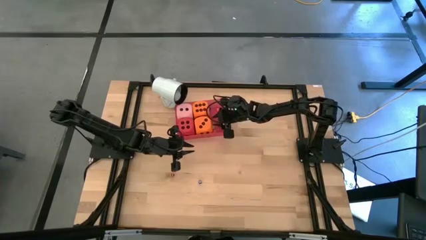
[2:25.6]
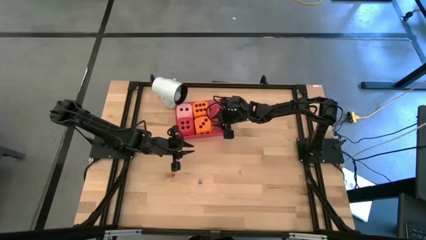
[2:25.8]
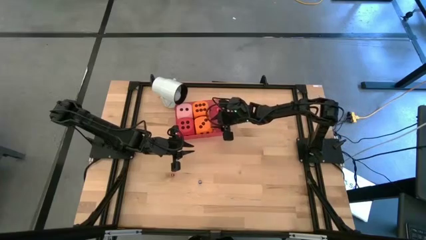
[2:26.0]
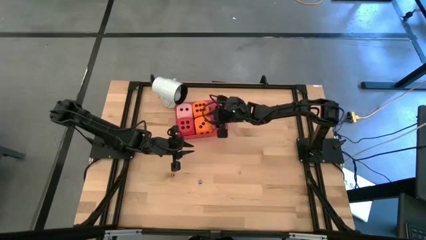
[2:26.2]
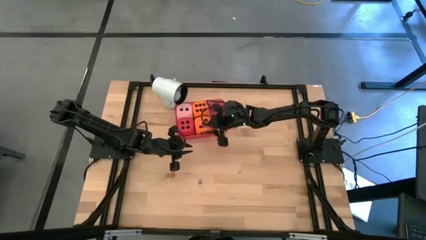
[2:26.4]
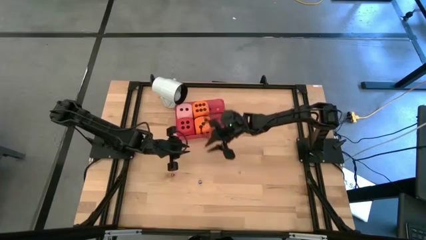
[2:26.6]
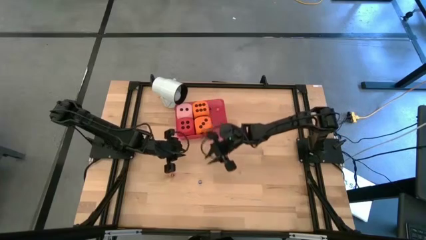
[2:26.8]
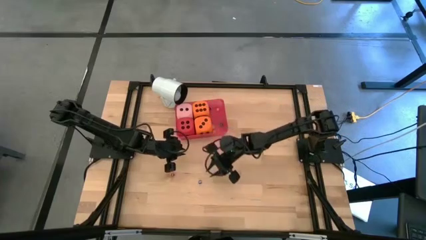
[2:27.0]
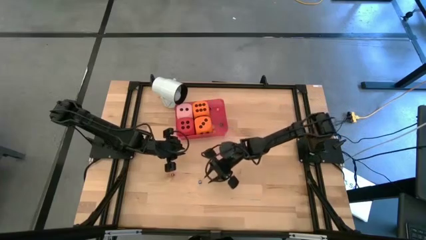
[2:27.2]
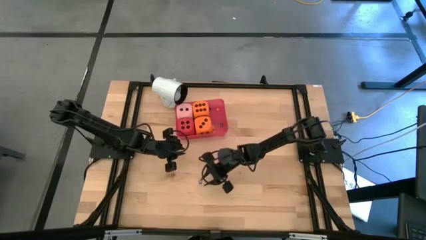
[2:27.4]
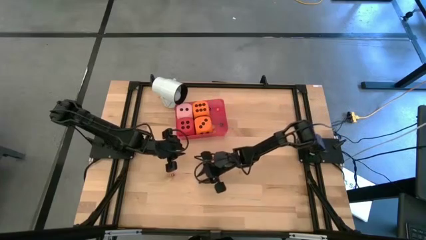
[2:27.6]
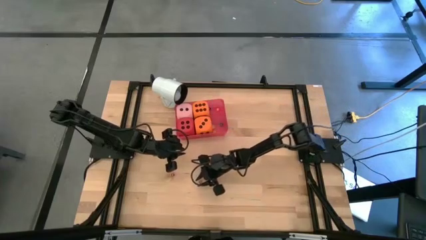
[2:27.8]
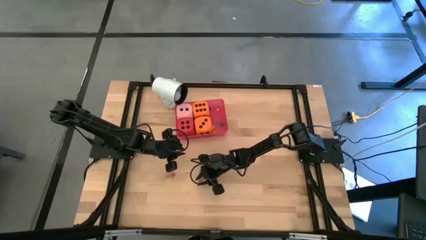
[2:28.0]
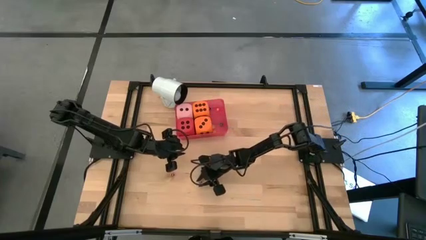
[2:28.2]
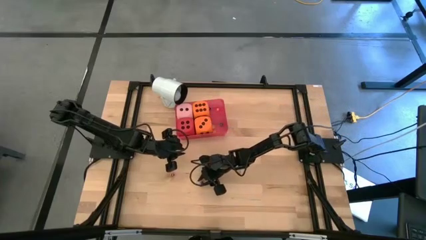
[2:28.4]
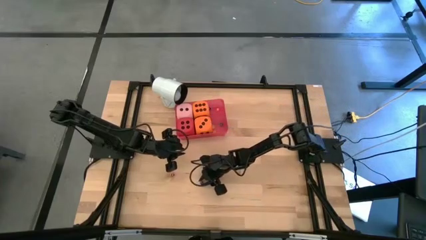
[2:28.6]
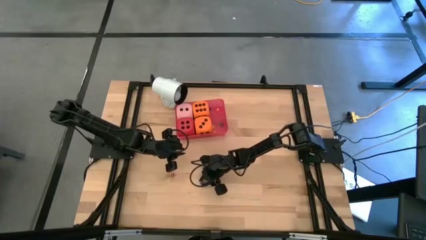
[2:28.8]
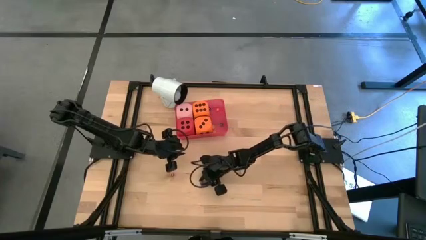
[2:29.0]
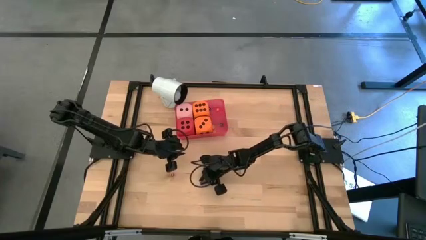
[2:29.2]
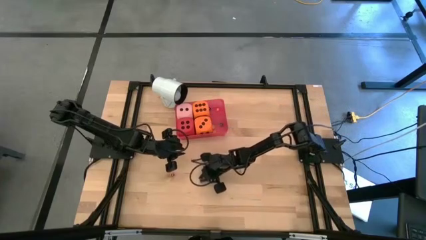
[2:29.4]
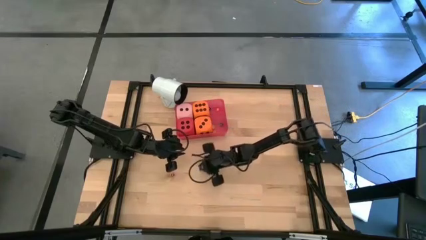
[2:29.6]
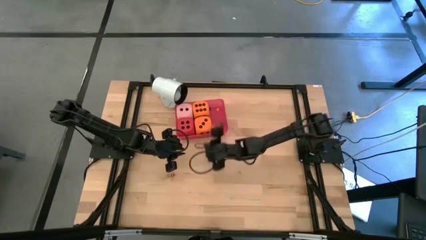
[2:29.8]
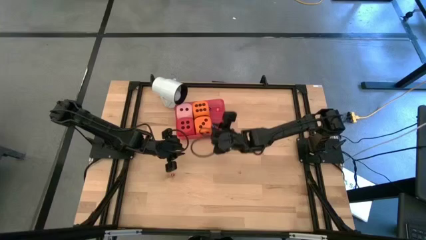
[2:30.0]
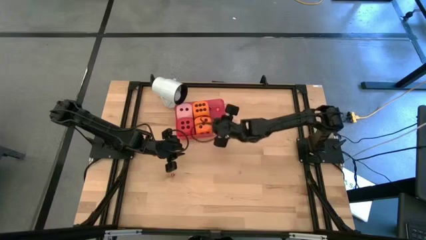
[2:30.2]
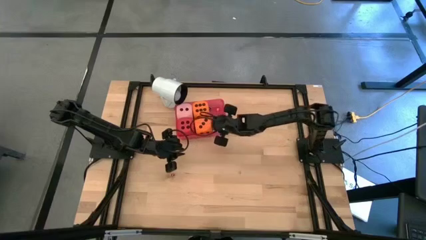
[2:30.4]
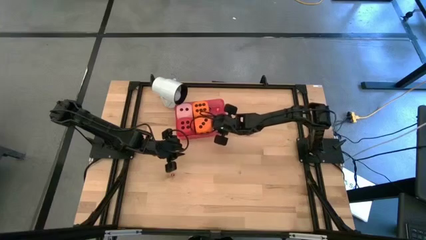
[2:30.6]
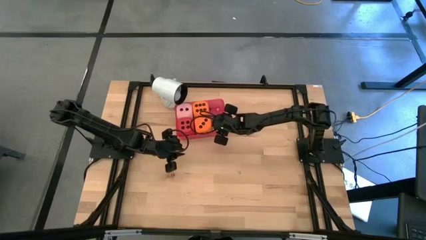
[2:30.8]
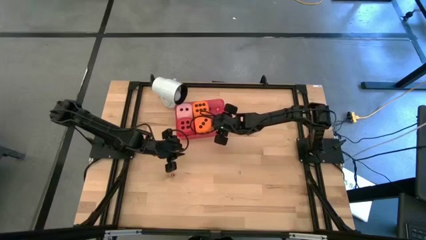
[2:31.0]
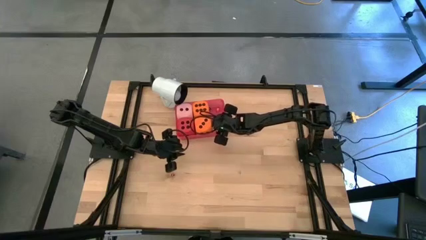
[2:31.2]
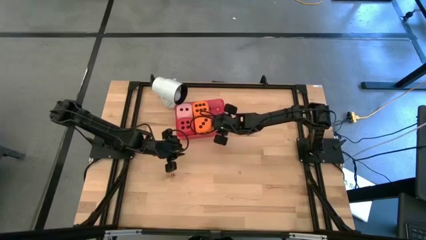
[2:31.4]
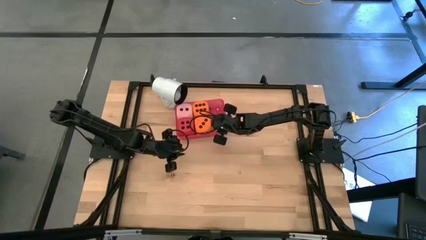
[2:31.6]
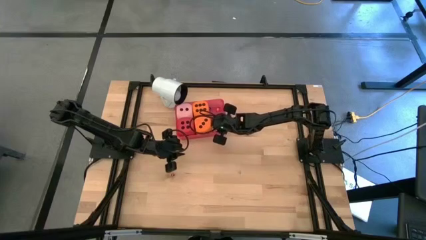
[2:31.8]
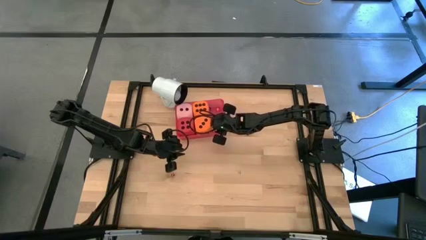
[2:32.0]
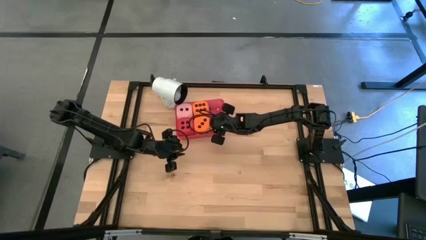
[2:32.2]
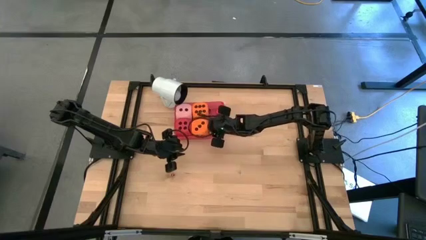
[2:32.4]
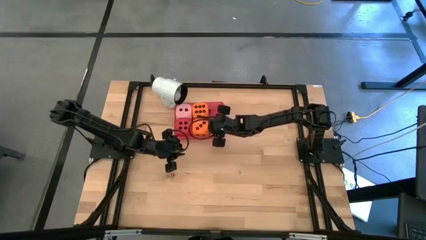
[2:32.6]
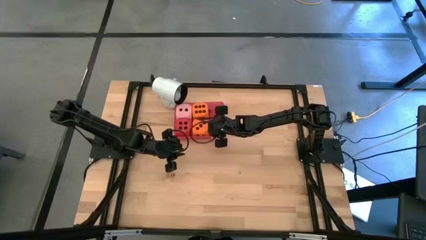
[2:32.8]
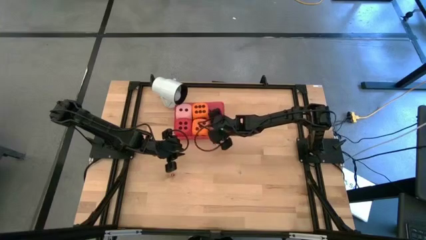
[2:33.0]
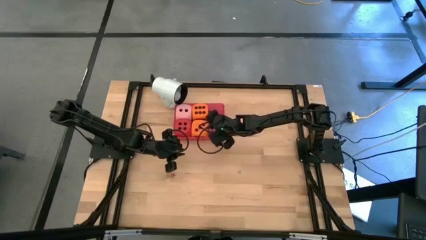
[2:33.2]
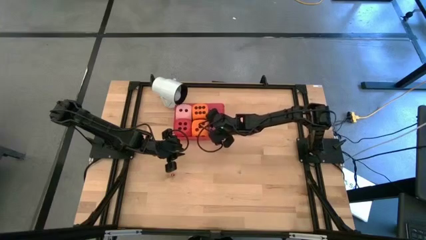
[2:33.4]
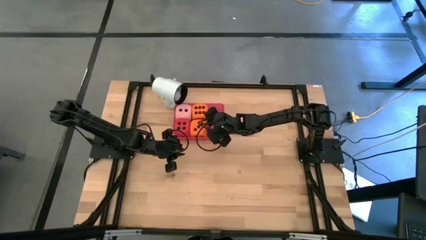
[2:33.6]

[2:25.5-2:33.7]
Task: Pick & Place Dice
Put the small the blue dice into the red bin

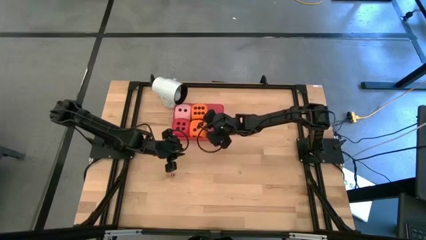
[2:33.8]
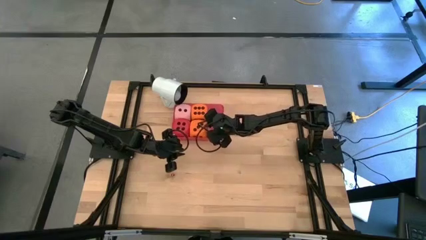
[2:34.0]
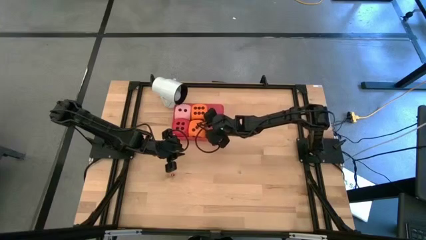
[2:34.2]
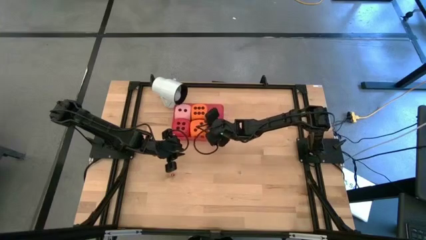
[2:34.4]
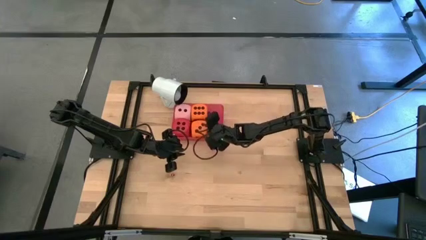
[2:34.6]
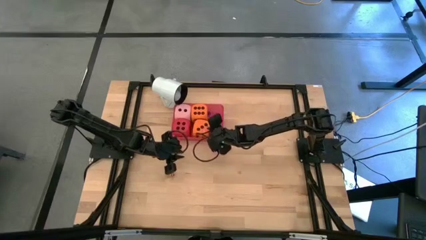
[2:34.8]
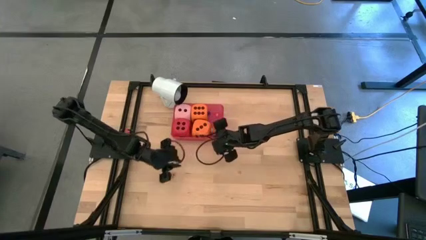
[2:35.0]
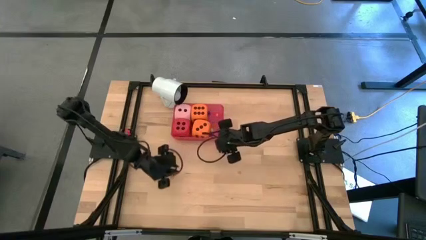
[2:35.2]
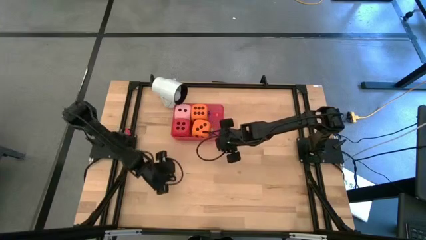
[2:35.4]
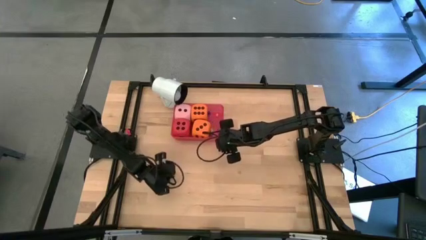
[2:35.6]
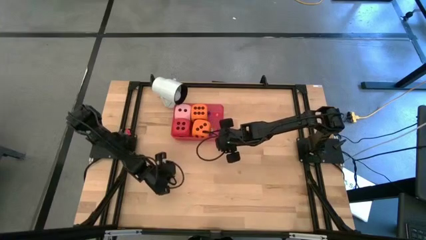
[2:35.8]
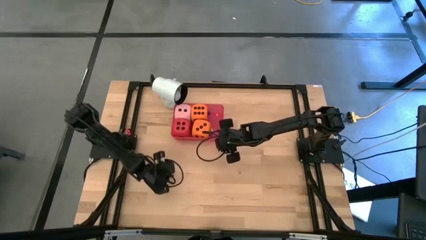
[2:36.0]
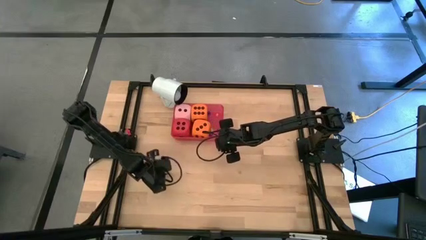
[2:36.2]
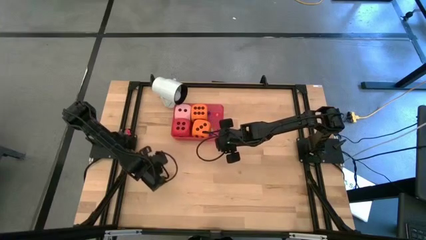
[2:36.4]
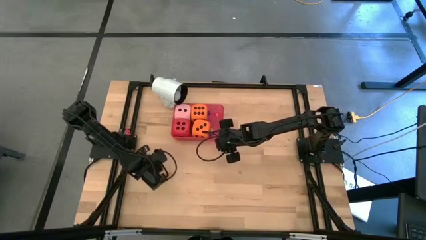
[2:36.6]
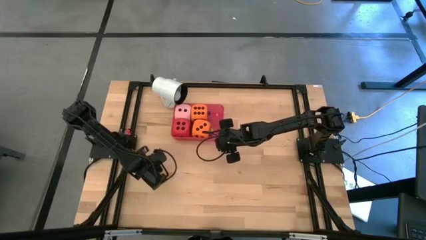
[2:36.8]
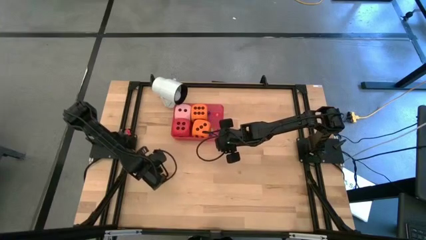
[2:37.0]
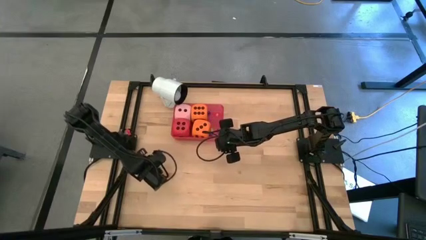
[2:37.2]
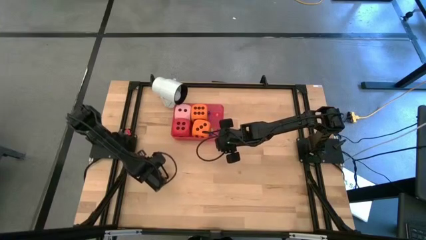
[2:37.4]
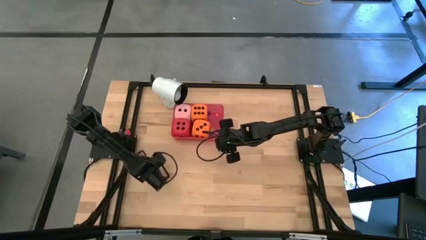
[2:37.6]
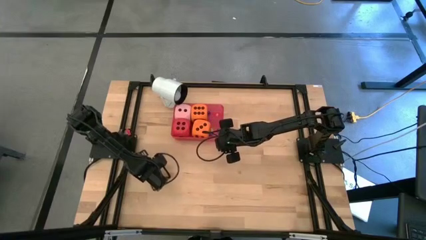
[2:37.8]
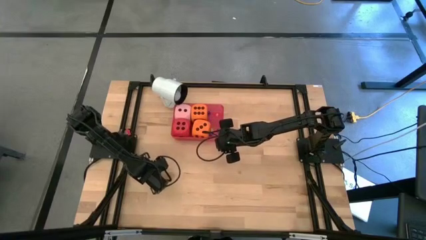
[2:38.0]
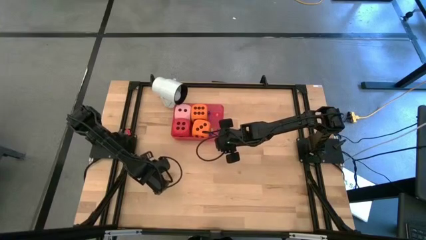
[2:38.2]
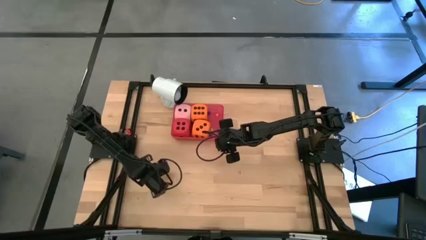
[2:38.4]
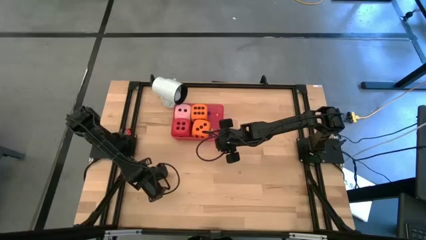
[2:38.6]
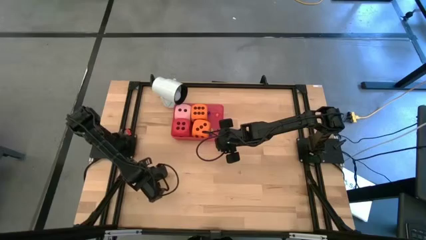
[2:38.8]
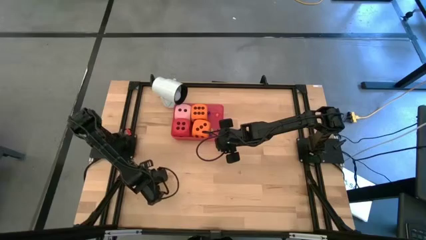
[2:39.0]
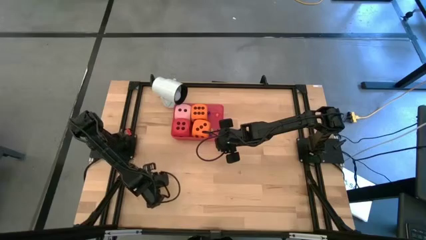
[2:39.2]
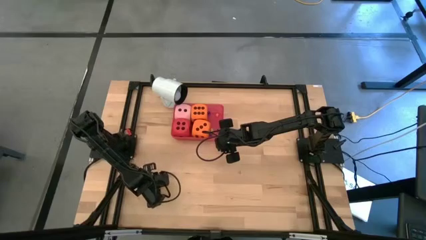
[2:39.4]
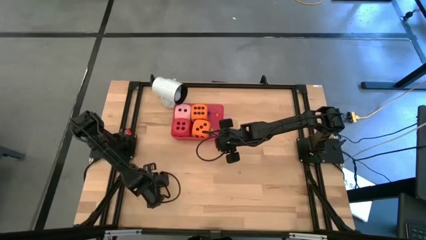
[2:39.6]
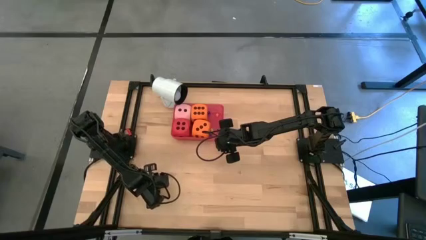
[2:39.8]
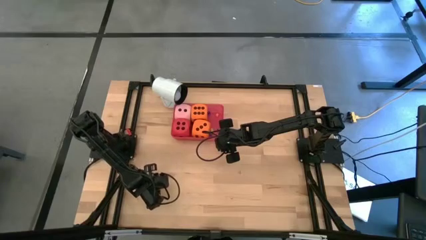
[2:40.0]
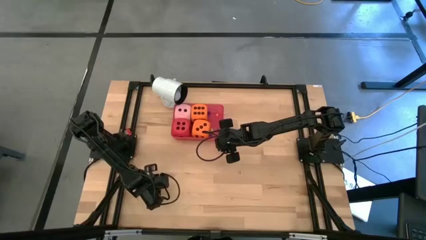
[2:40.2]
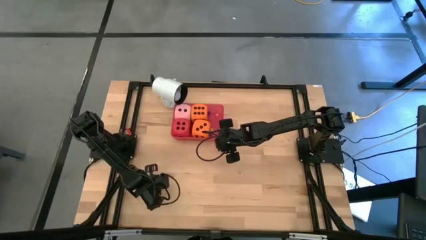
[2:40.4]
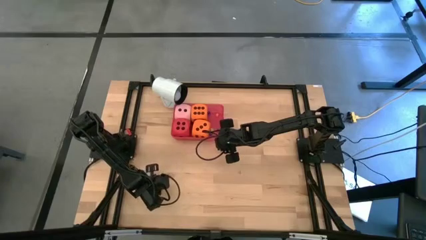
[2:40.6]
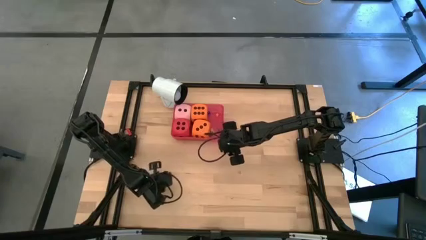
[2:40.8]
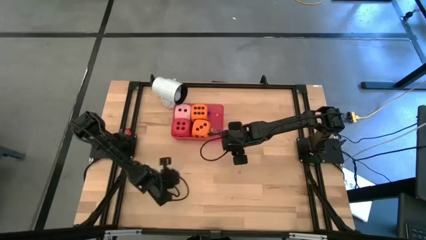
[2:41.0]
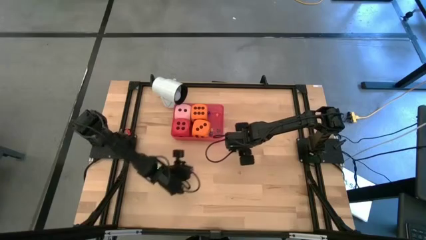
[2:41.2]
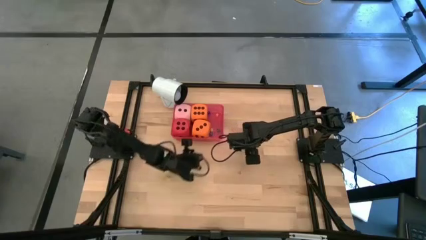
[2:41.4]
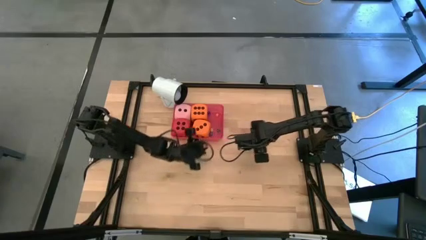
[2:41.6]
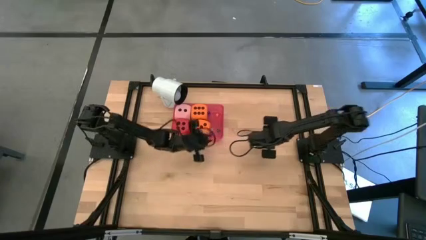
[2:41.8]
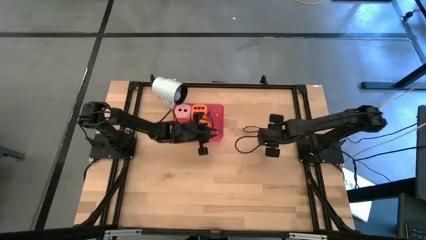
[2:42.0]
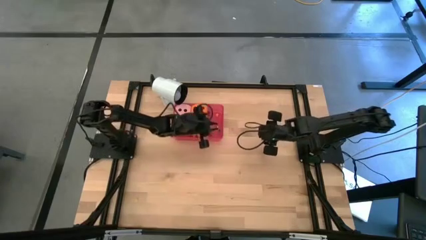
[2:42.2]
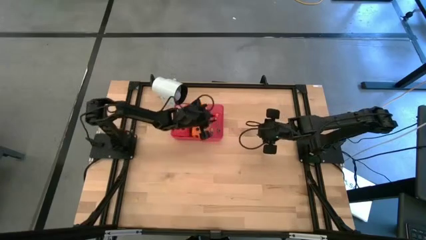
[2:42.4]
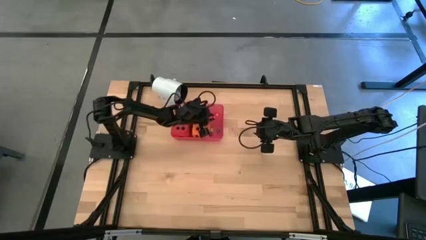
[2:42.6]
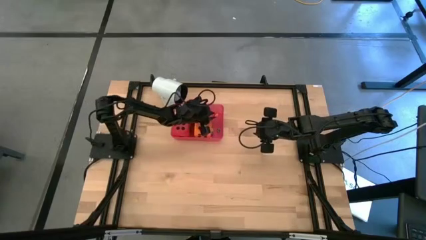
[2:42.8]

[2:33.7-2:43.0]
Put the small red dice into the red bin

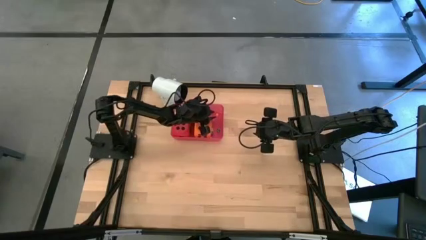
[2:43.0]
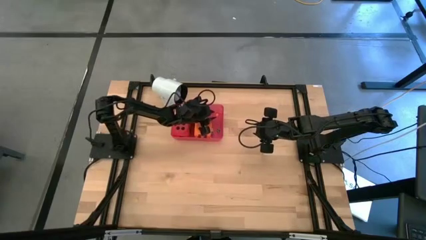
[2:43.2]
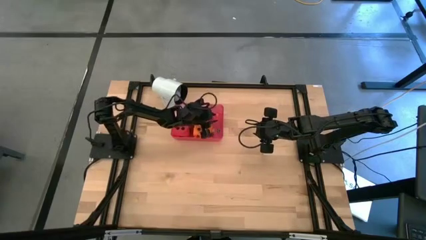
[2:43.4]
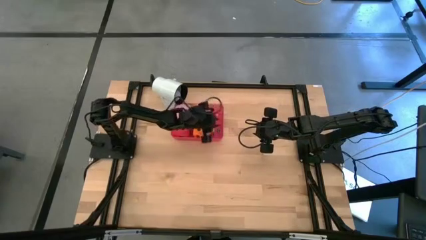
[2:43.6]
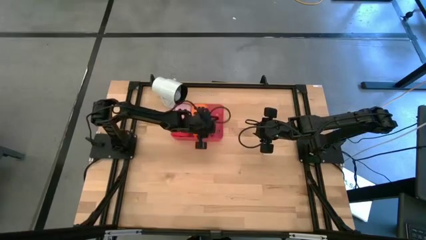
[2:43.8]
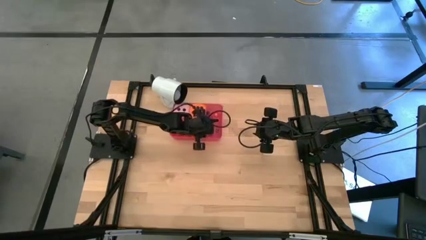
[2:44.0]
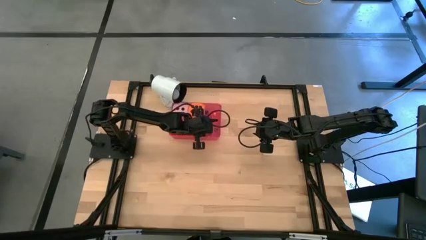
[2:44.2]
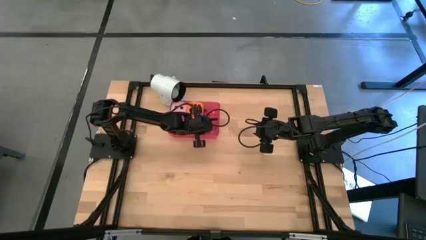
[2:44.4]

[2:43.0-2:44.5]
Adjust the big orange dice in the red bin
